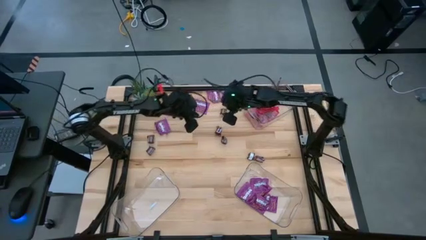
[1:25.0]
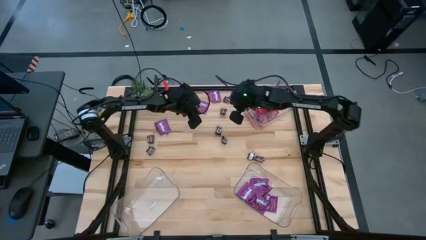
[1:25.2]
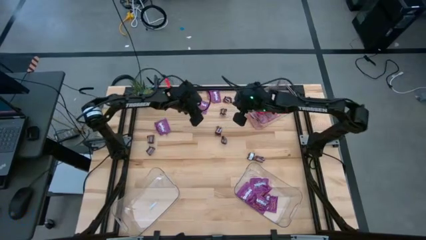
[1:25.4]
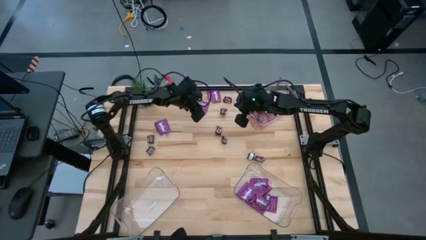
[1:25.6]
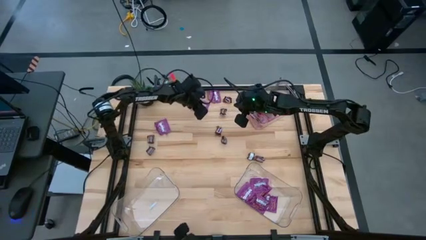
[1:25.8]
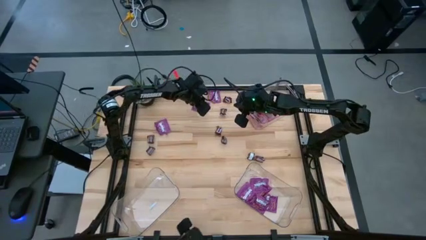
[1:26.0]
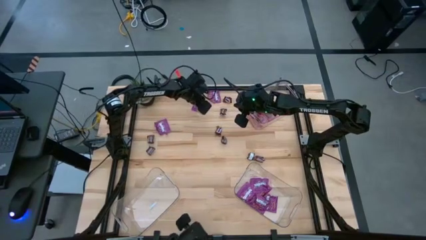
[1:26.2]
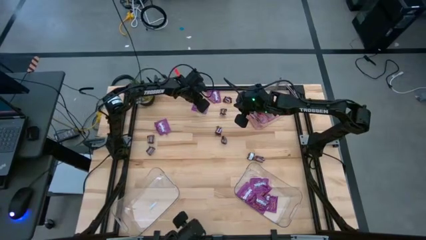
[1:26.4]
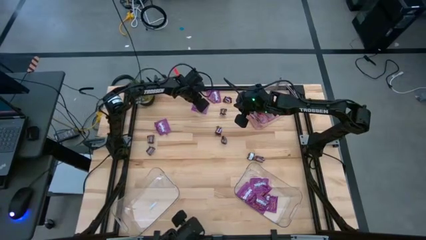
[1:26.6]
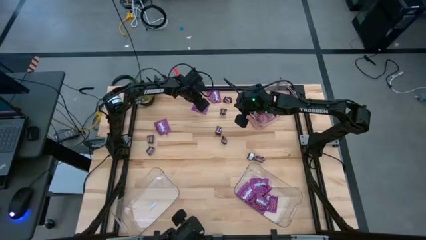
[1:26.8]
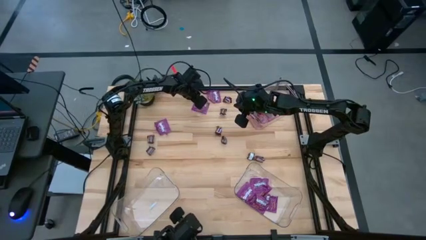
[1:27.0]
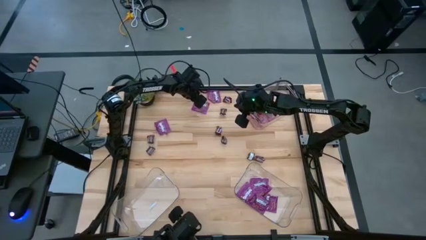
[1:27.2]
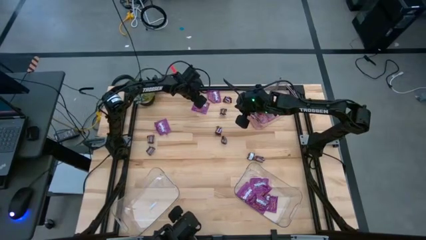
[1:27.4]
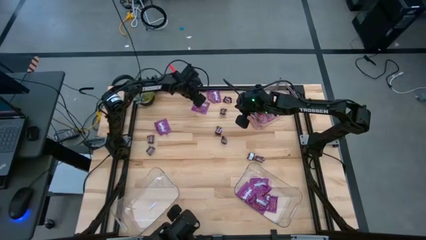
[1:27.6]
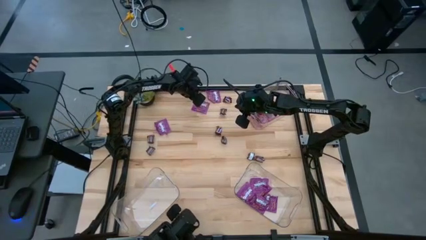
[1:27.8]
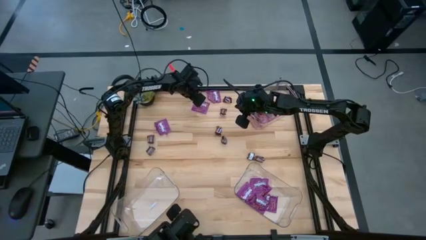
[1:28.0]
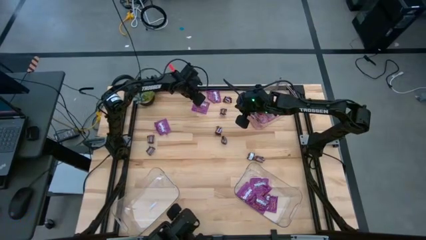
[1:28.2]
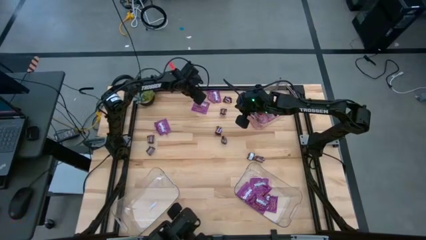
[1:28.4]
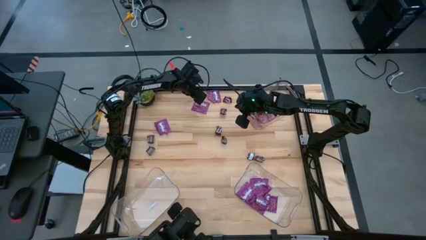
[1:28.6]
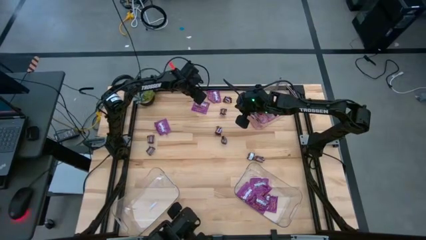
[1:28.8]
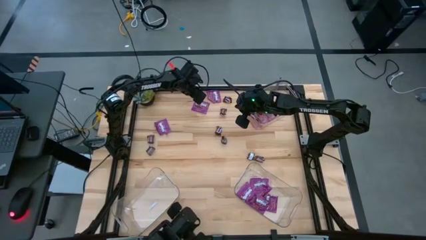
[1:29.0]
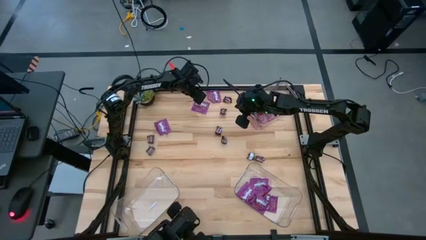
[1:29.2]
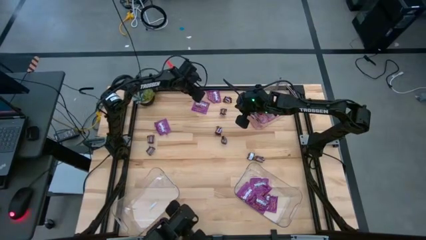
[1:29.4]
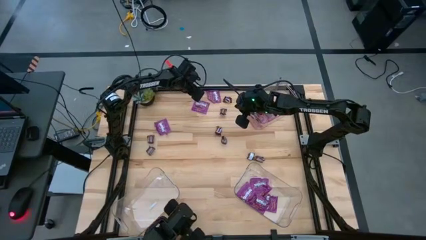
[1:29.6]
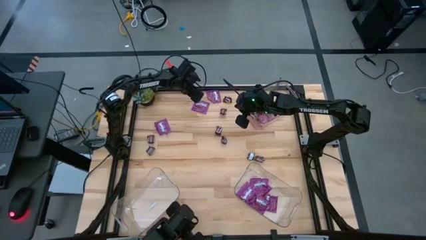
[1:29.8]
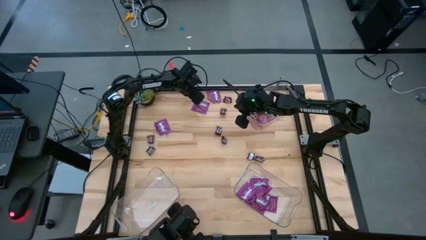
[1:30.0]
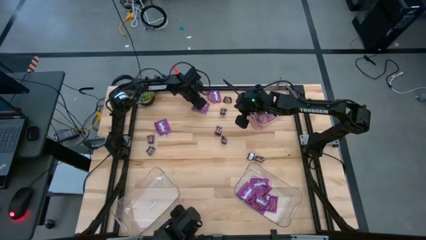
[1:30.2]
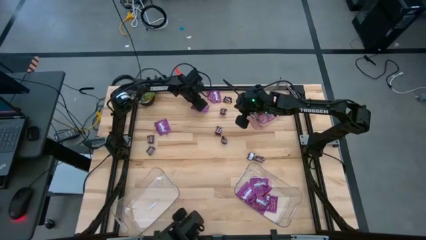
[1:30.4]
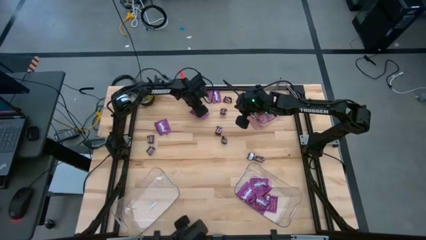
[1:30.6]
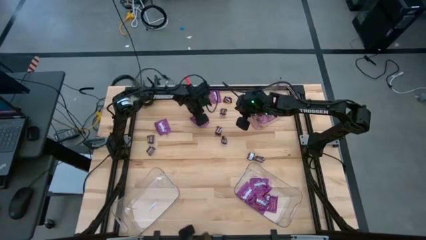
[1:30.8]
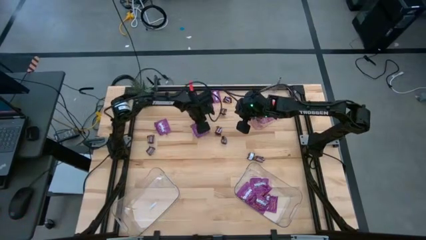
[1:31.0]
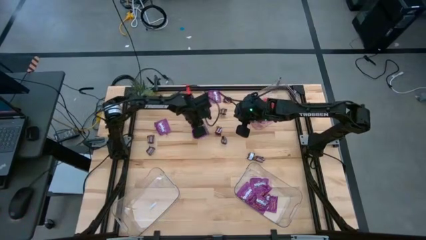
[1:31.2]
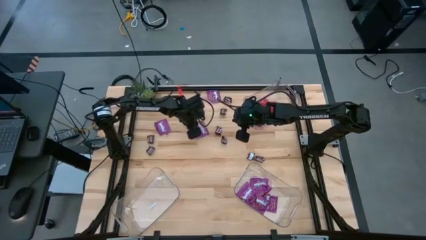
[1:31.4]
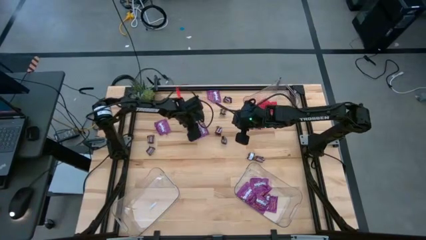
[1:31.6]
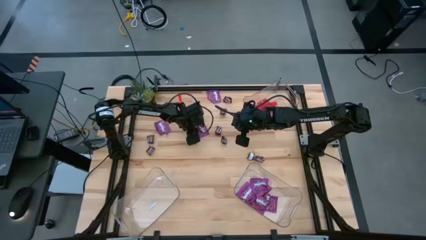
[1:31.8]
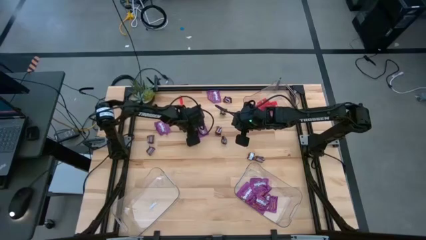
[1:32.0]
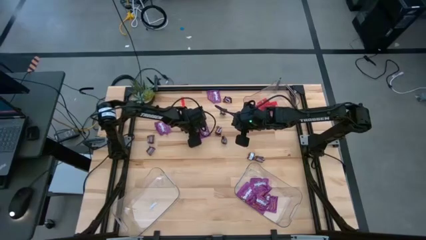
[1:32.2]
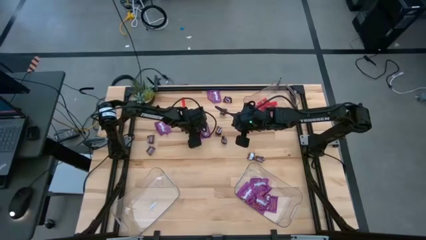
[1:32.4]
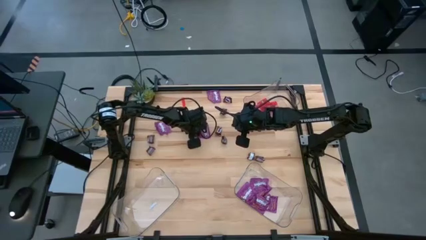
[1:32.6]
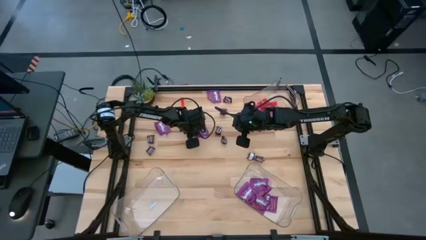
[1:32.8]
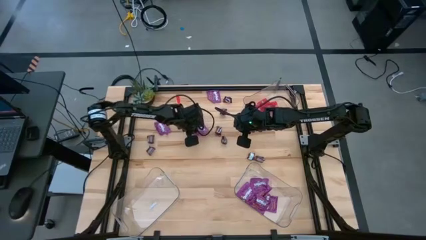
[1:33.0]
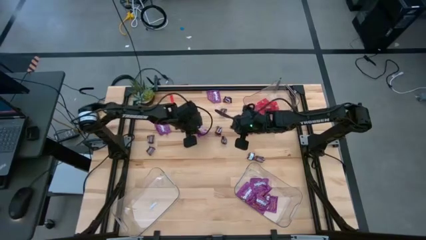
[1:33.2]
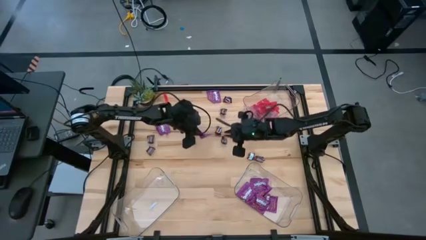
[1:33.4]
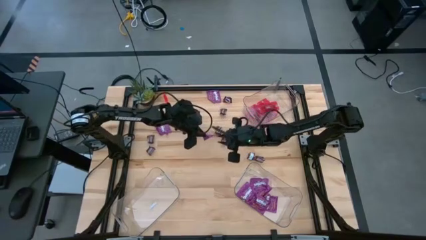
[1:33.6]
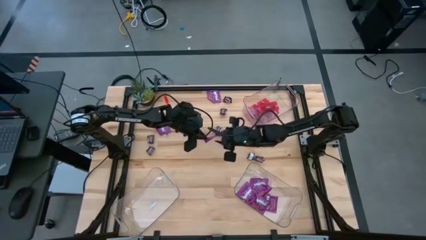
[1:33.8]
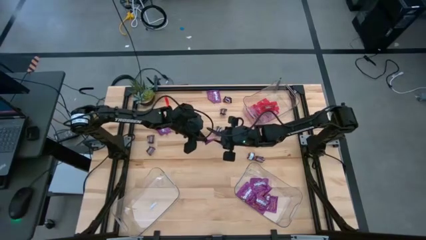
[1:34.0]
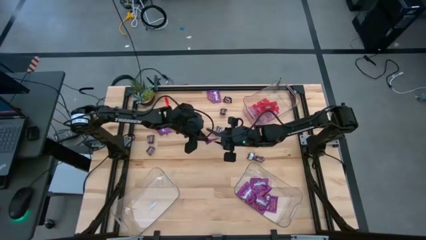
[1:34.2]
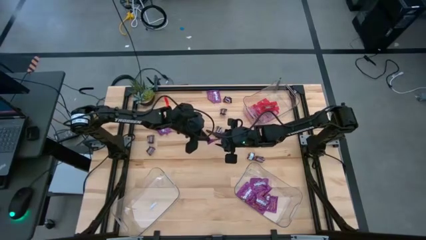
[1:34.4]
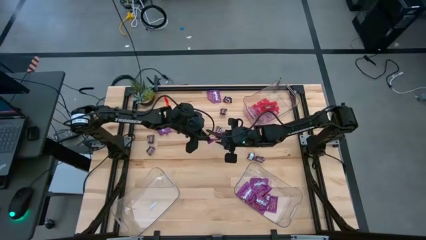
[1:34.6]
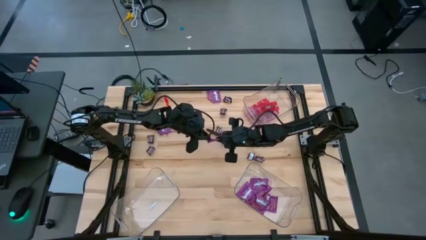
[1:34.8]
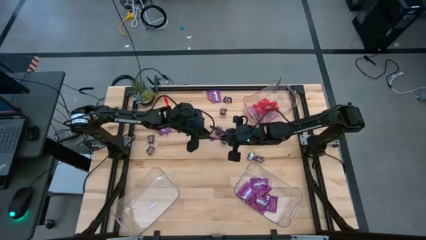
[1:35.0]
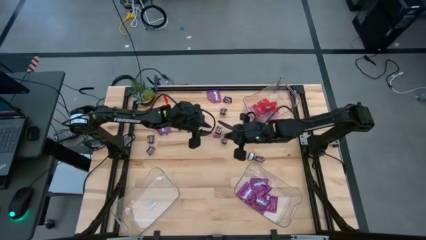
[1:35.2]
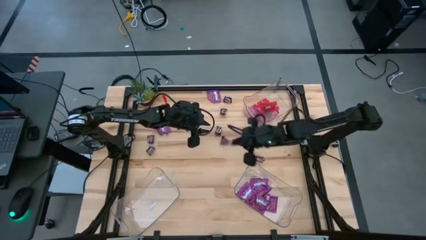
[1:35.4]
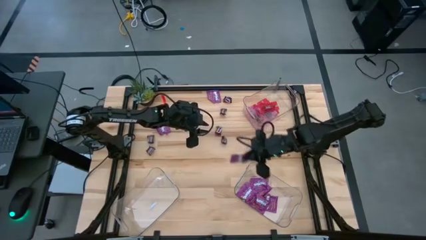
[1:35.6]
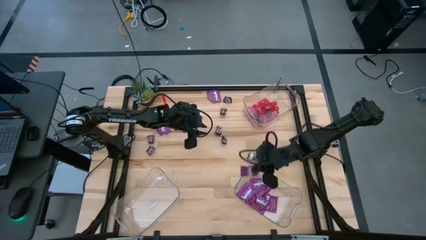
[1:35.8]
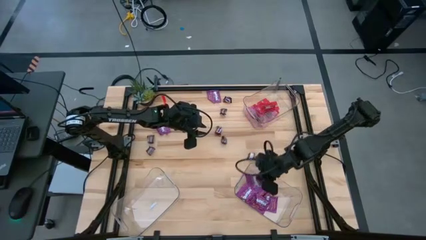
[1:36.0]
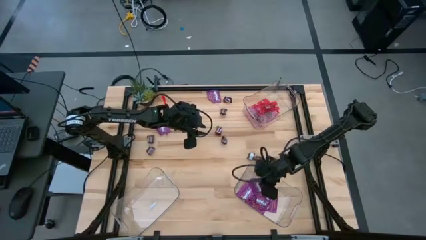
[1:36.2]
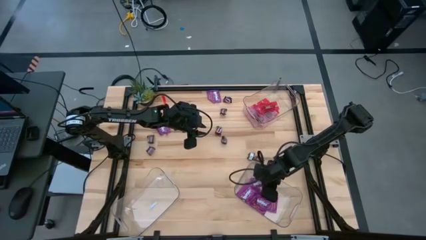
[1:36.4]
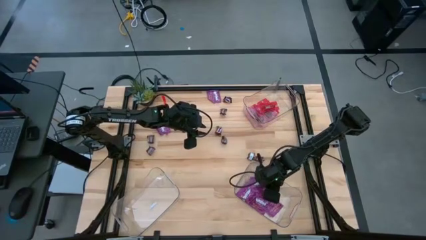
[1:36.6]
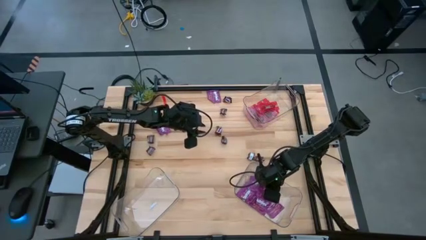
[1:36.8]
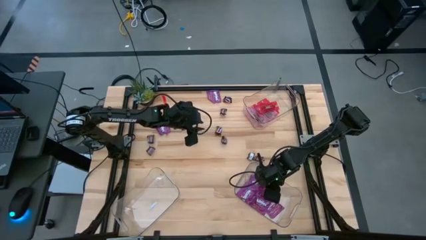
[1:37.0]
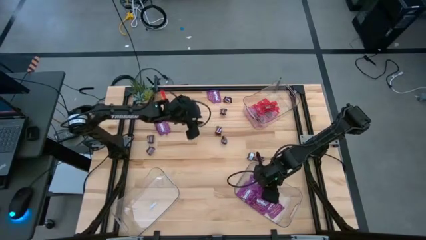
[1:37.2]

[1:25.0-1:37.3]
Task: Sort candy
Put the violet candy into the bottom right transparent bin

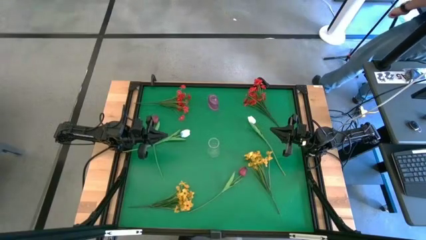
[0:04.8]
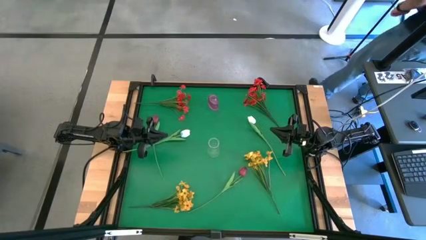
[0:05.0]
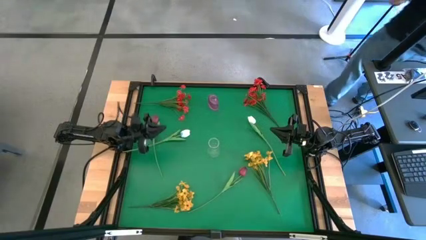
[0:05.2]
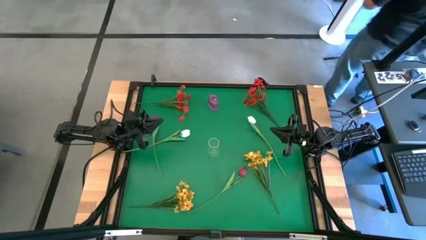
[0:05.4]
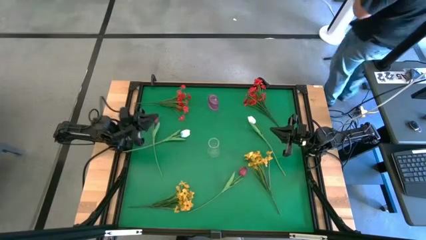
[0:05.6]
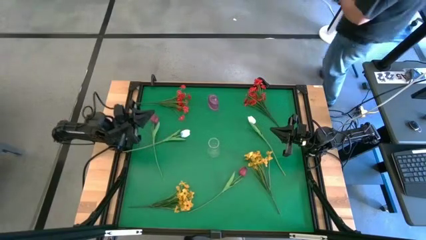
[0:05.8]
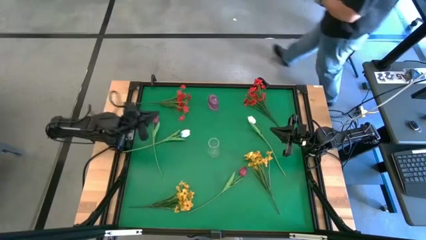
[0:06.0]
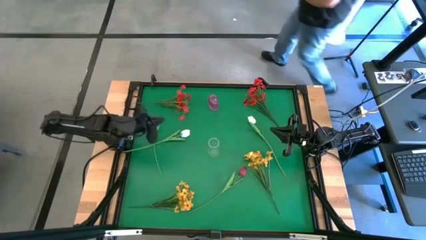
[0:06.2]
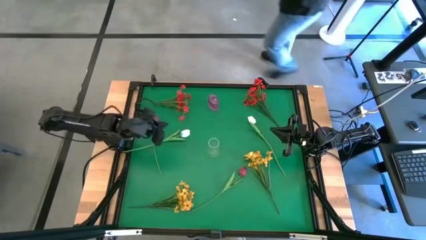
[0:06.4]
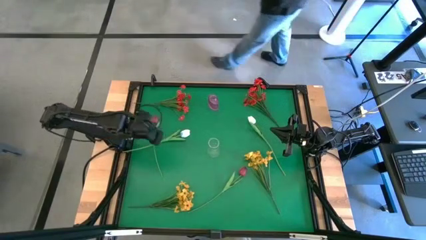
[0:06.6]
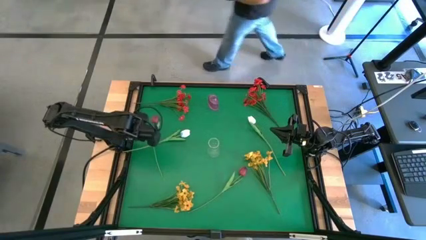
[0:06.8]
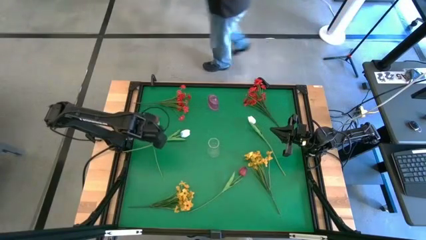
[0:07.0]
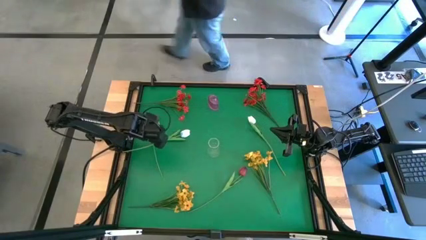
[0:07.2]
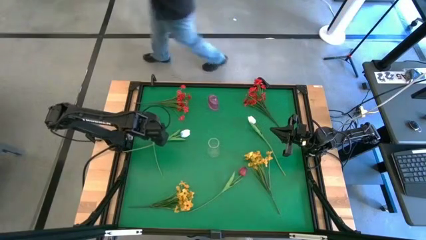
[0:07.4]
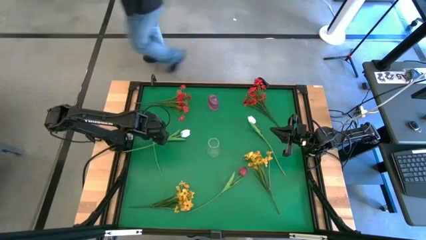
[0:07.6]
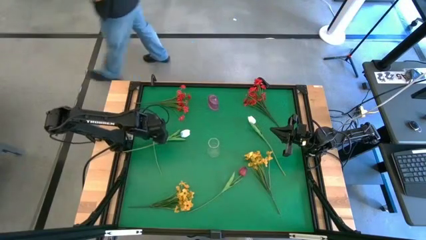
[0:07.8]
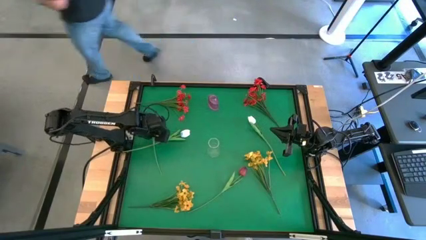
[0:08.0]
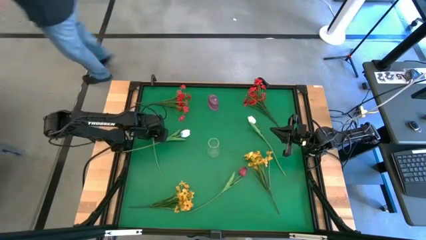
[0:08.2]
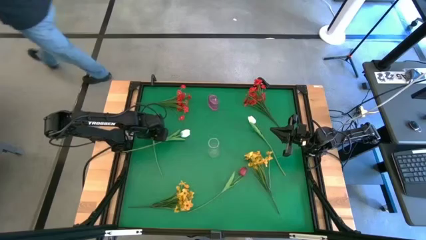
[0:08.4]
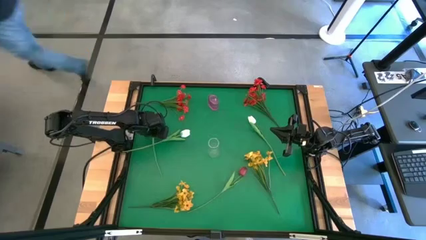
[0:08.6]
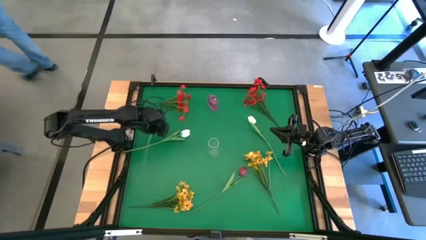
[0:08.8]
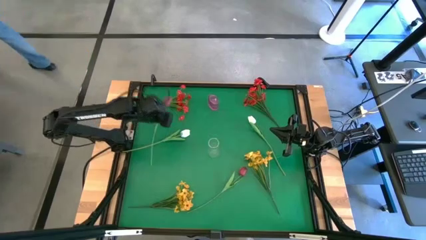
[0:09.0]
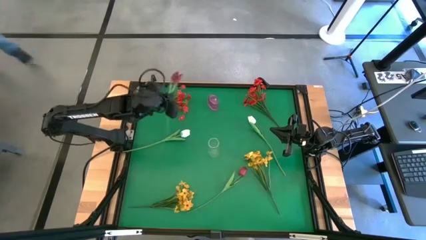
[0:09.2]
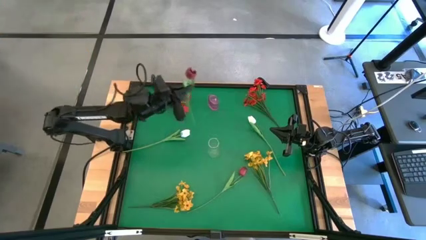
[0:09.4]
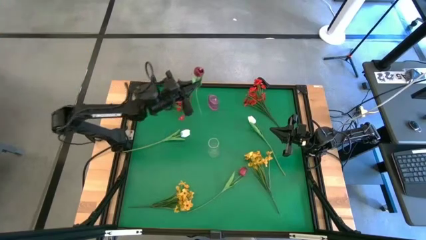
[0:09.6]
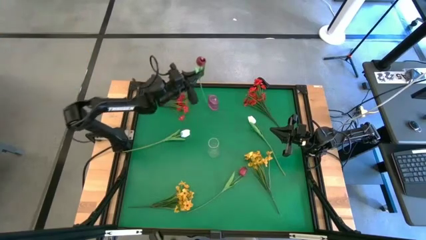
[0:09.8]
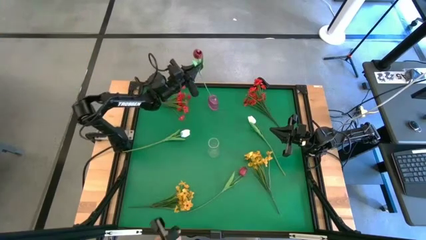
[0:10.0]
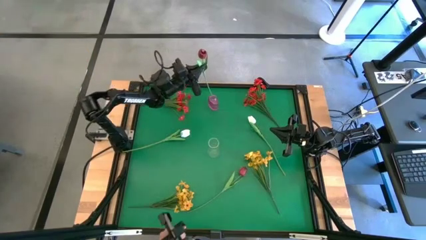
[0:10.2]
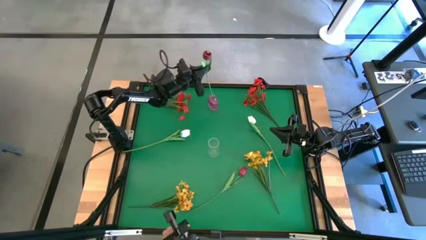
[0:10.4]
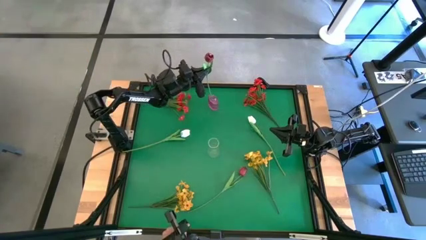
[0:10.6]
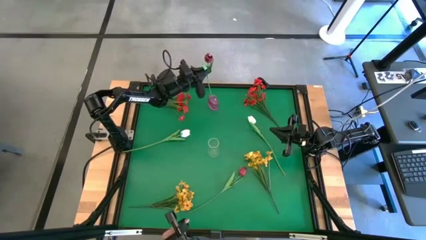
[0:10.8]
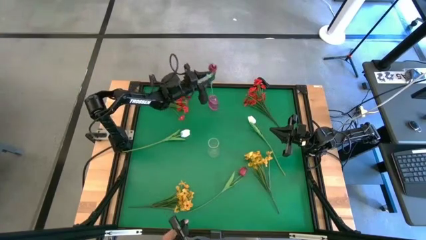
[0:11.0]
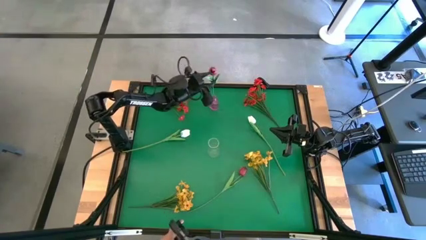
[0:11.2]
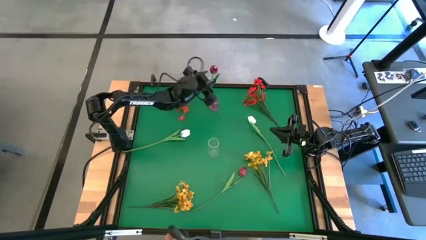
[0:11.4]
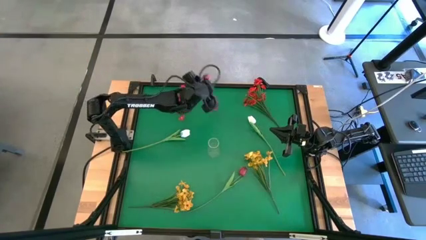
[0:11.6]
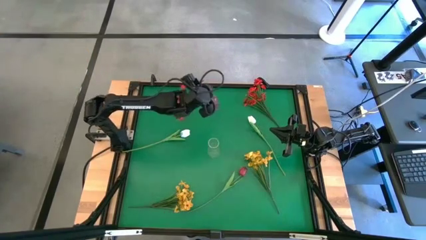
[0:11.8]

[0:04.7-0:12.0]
Task: Sort flowers into vase by color
Put the left red tulip into the pink vase
